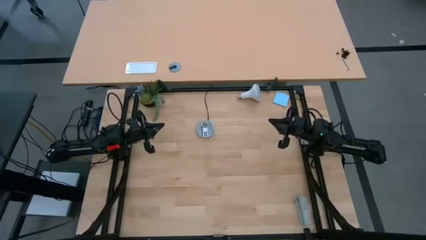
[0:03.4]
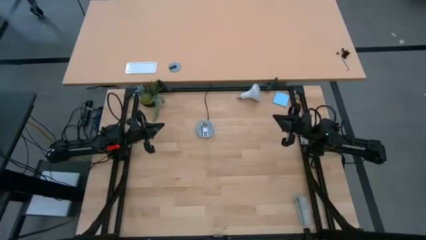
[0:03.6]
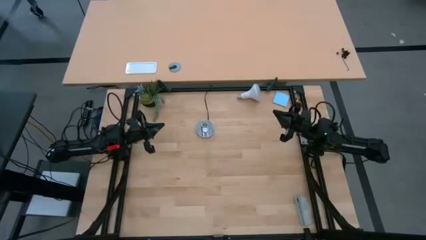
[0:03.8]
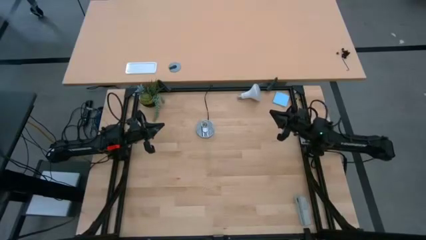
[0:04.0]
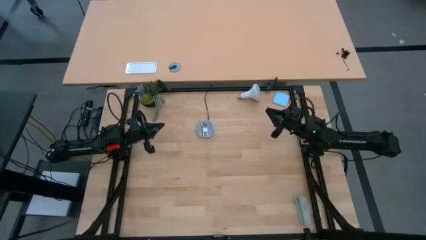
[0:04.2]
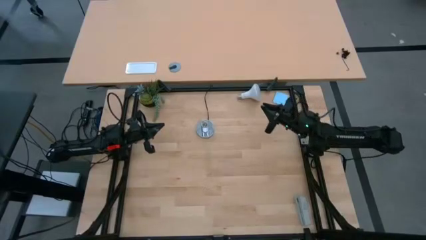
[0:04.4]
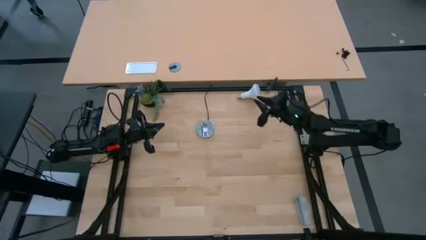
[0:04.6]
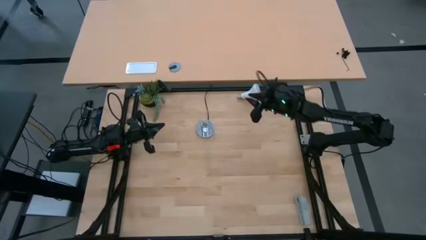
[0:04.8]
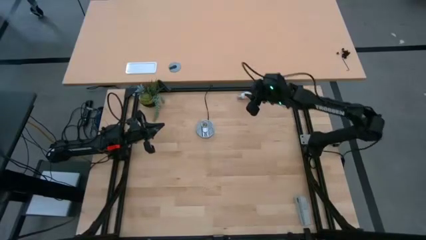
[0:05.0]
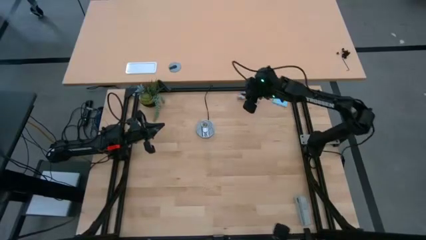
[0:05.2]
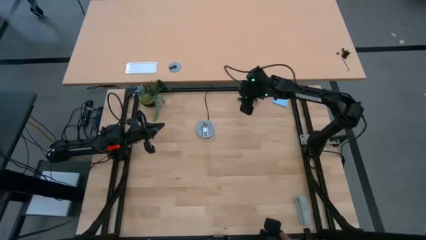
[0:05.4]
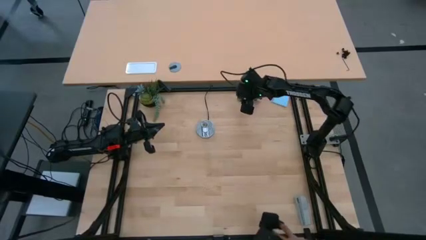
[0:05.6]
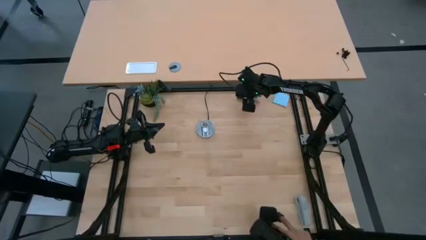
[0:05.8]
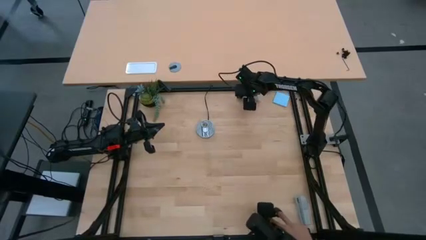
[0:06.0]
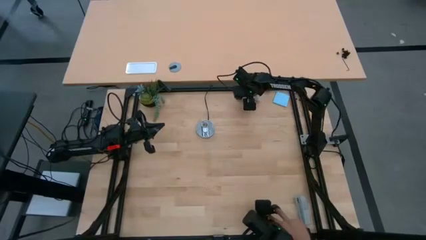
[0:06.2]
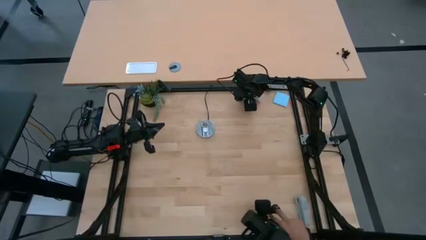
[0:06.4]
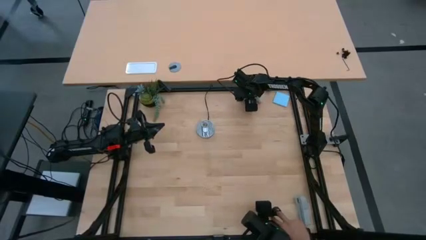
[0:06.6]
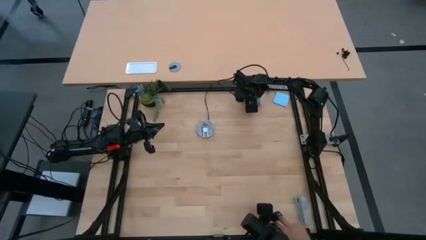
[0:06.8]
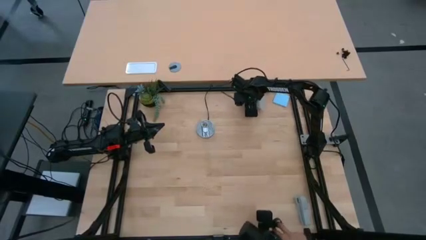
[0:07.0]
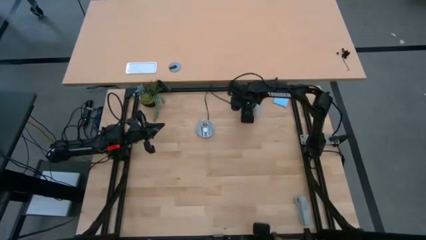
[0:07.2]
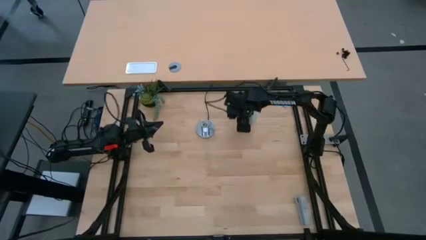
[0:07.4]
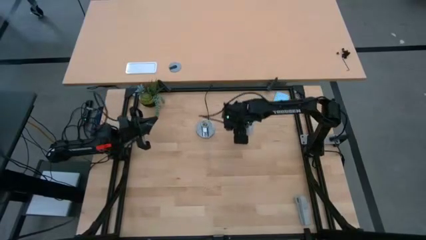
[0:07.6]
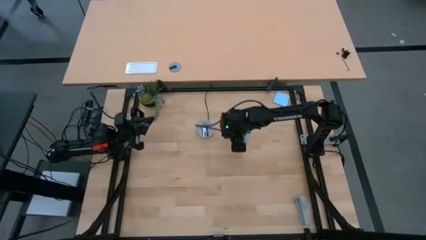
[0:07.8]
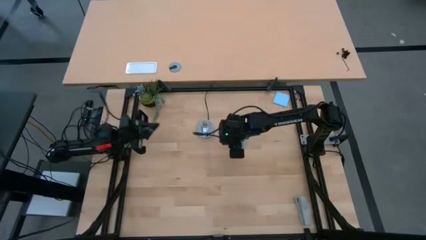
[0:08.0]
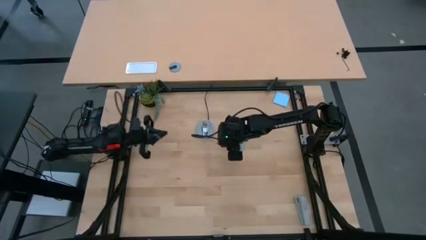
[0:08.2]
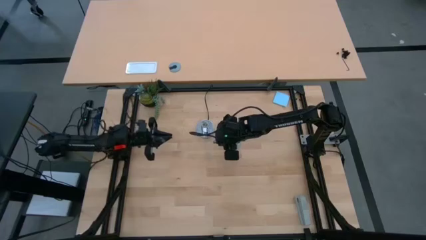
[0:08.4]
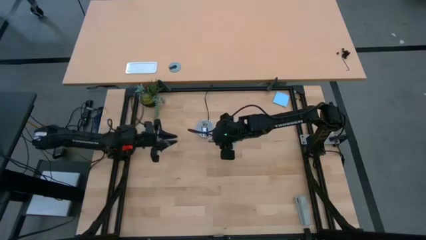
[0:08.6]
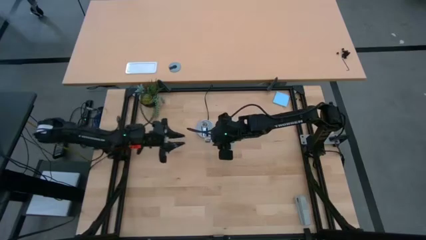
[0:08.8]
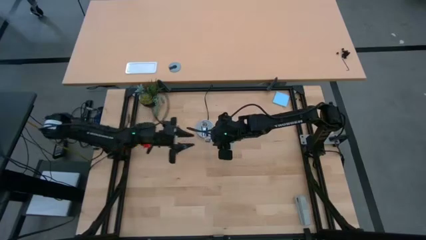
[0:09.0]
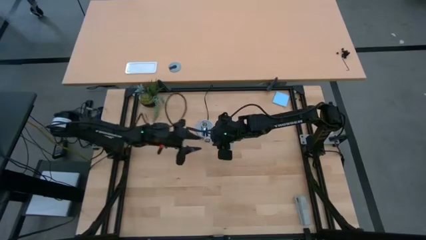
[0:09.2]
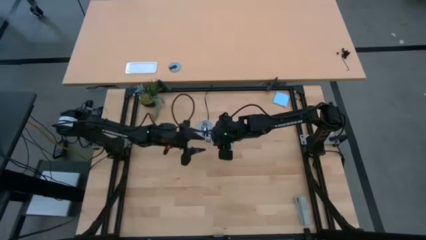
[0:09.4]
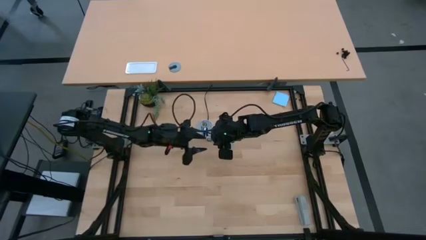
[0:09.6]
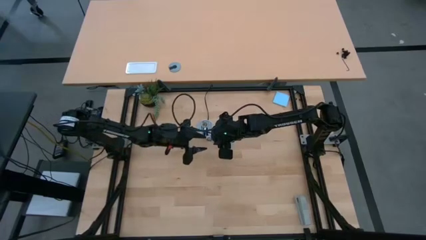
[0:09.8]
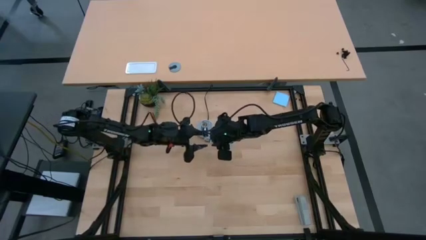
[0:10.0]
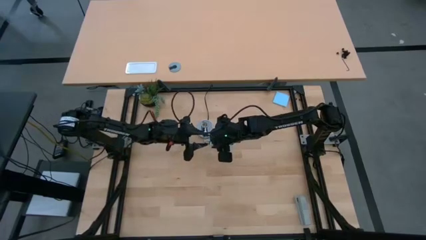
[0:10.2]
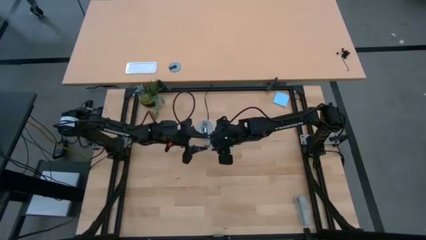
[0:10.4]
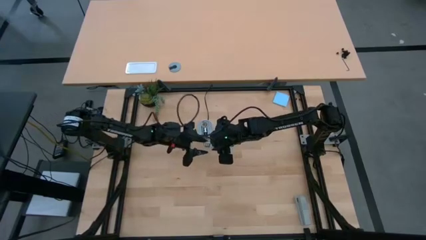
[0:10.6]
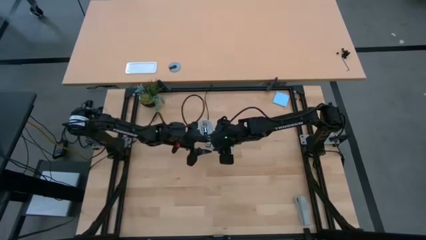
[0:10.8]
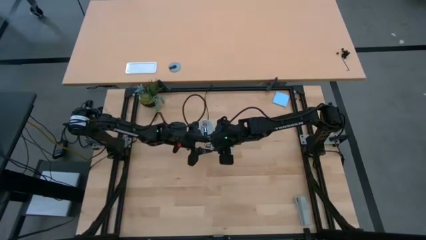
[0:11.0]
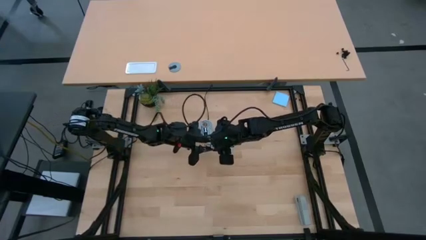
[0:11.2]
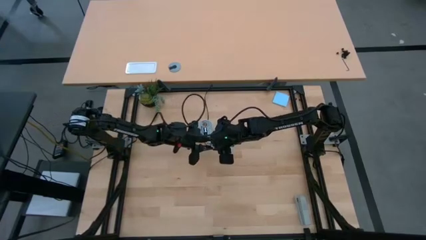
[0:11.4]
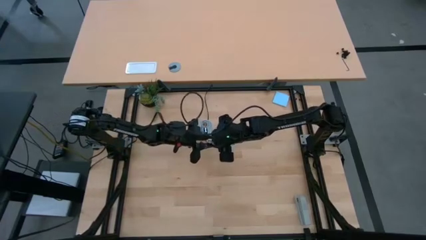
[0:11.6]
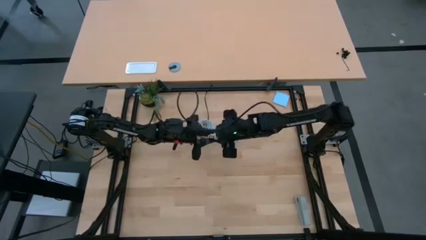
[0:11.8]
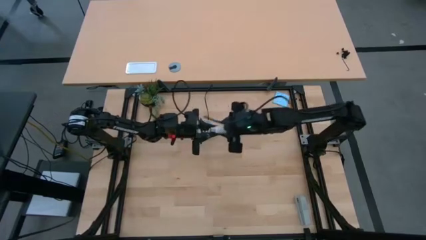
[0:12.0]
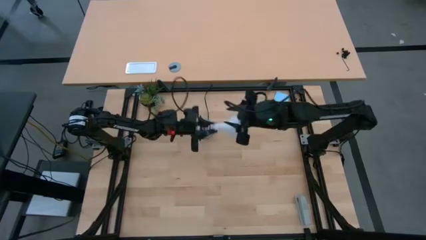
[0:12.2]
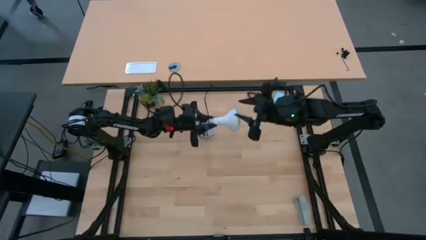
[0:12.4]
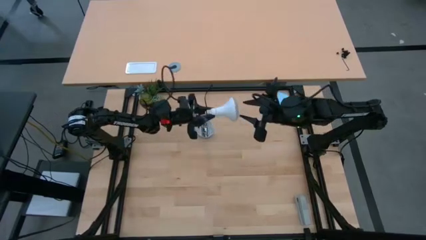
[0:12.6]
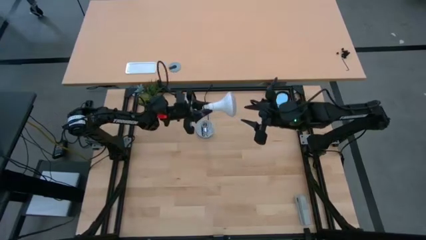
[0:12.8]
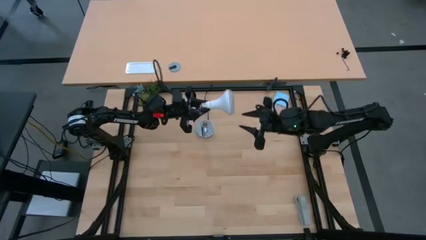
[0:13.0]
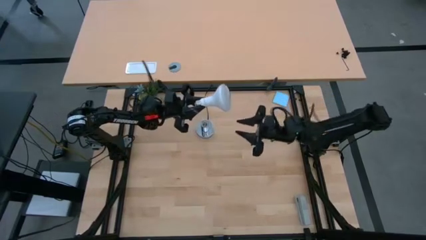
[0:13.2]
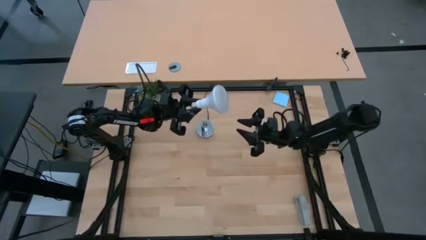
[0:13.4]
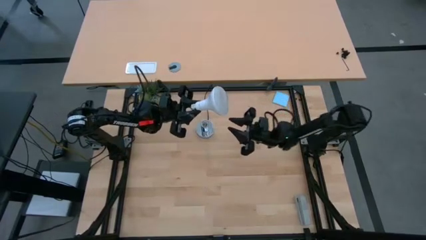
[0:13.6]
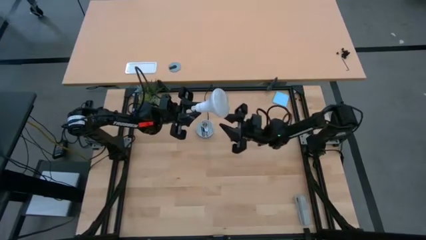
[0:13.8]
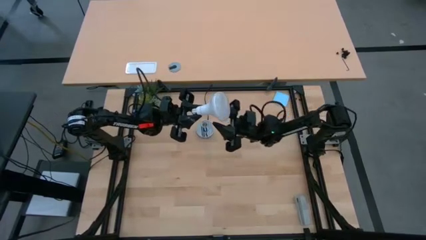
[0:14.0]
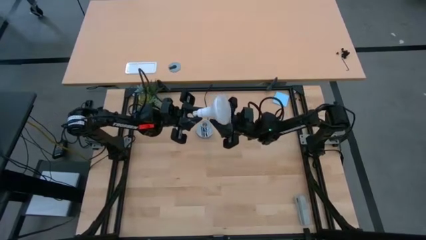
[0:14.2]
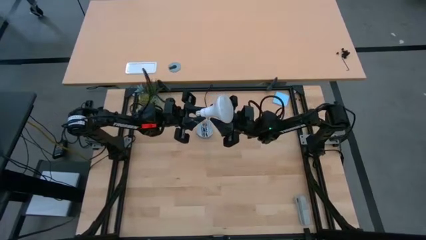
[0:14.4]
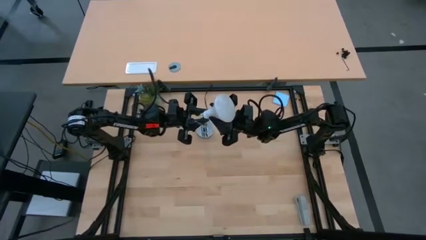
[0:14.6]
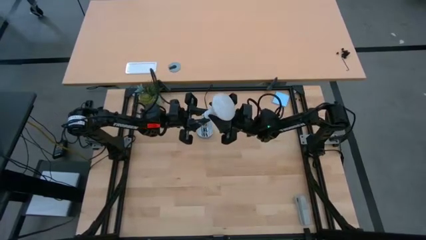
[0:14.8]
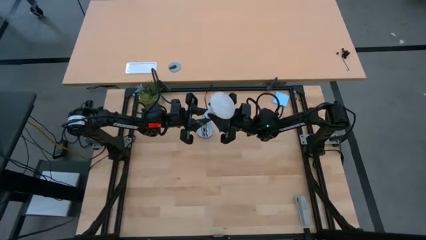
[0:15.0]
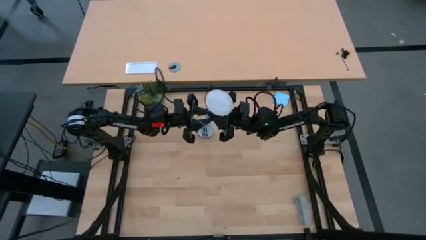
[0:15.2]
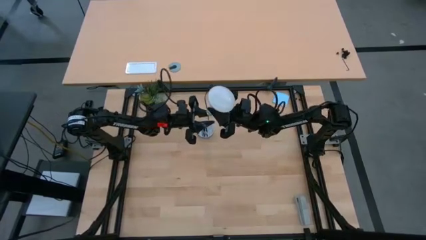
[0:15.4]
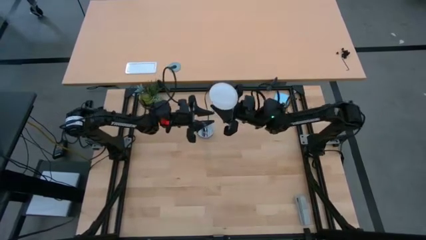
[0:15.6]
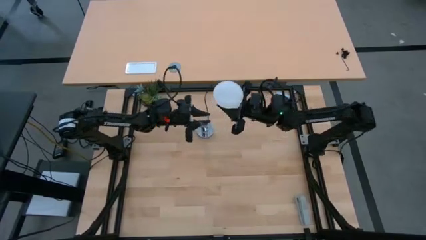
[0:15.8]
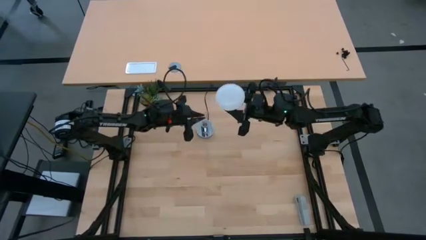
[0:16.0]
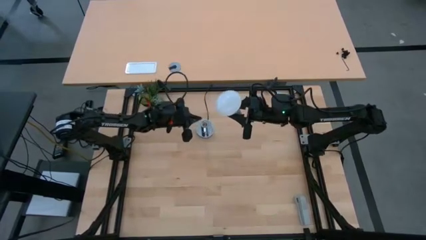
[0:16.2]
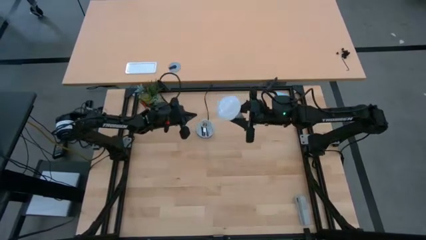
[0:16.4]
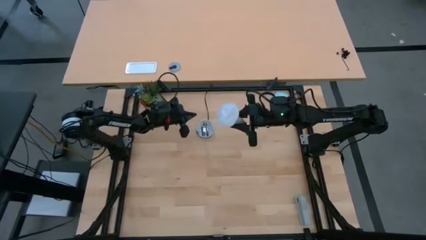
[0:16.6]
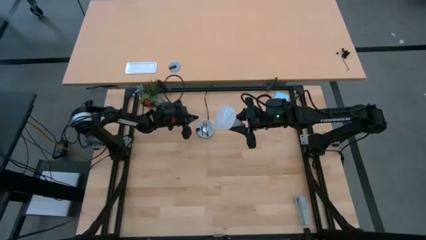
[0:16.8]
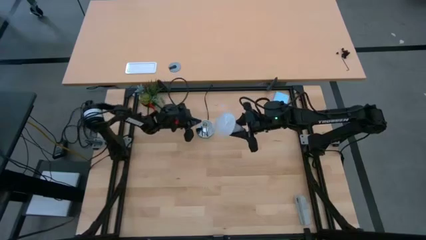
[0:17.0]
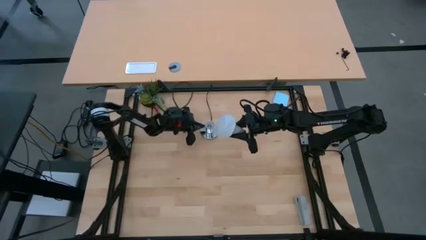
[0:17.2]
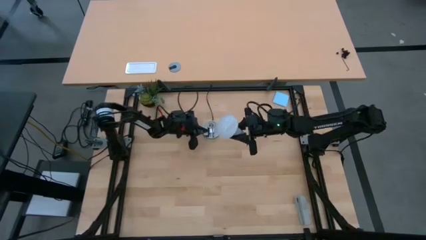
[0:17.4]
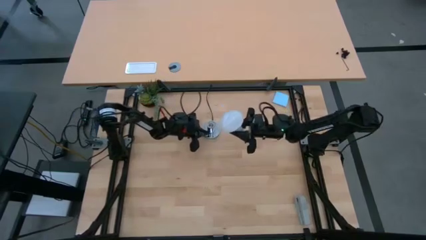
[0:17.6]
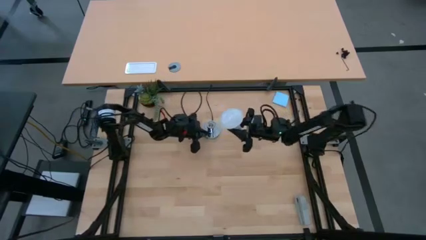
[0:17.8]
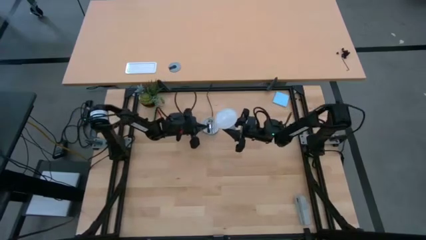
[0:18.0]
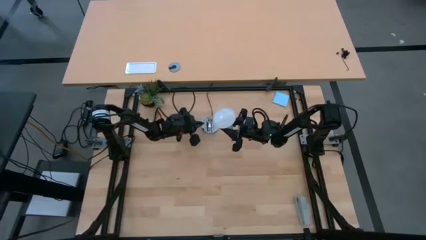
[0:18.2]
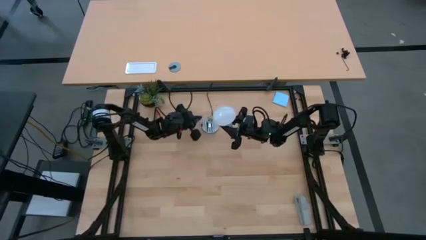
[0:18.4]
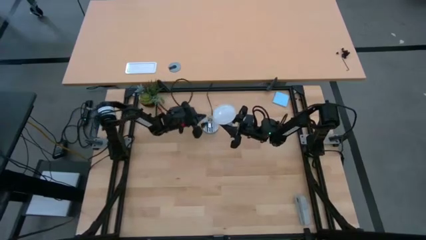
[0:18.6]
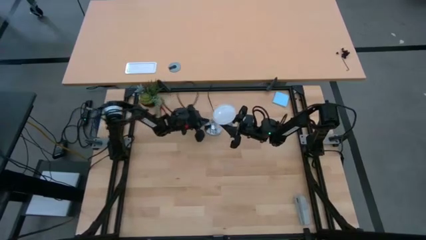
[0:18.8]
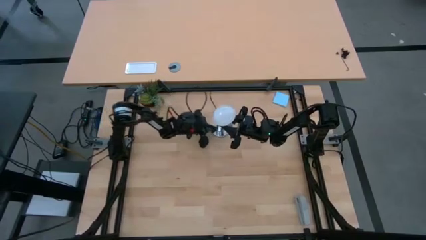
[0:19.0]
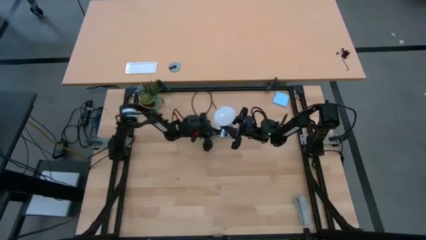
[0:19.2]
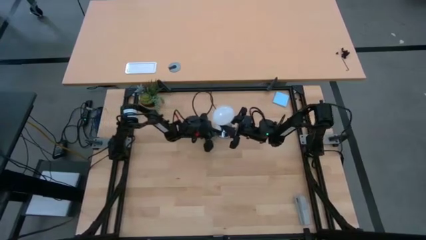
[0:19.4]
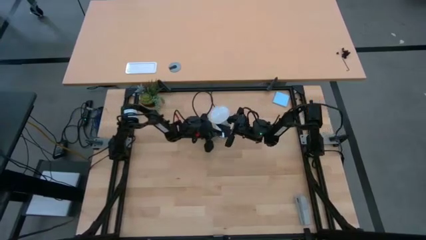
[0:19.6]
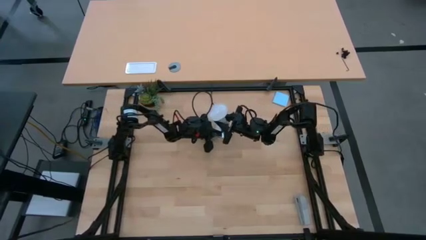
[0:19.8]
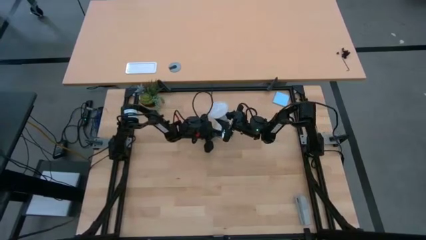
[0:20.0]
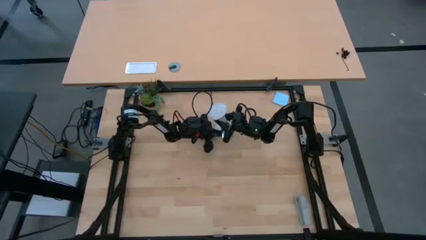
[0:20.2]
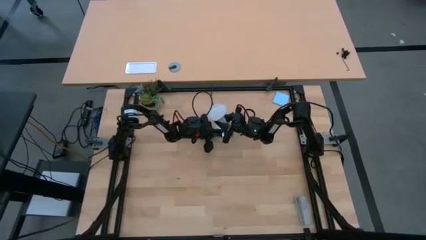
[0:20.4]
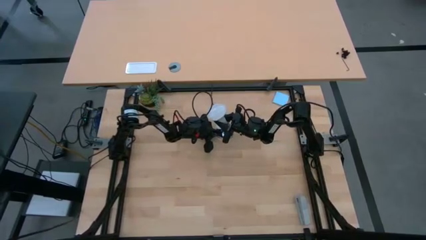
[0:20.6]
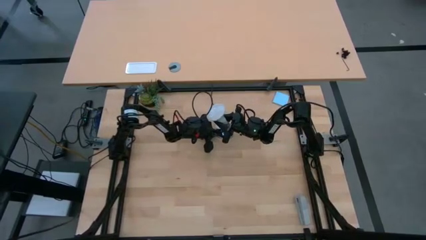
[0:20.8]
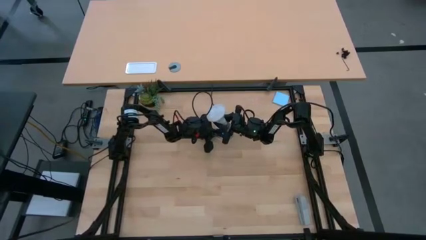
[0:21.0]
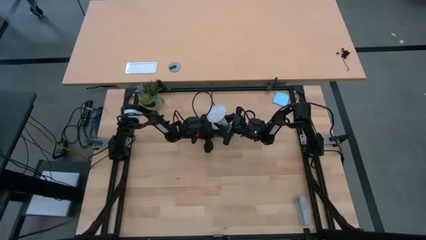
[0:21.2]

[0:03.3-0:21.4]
Task: Screw lightbulb
Insert the white lightbulb into the desk lamp
